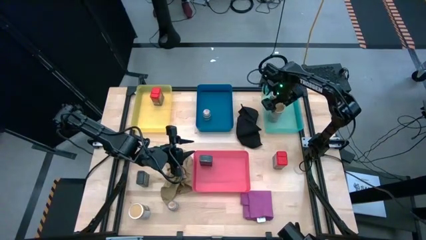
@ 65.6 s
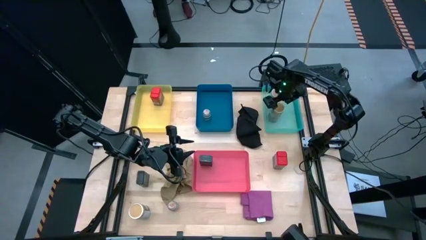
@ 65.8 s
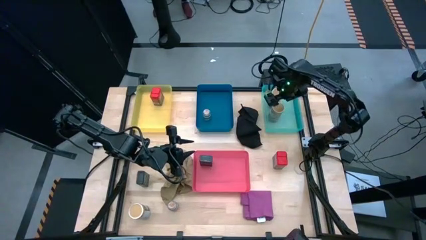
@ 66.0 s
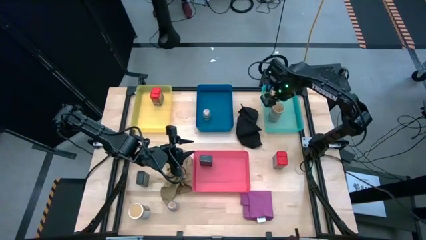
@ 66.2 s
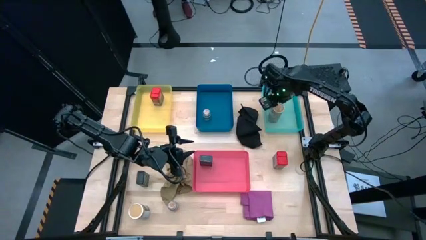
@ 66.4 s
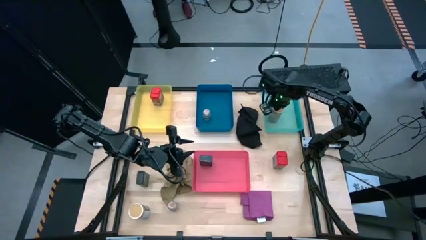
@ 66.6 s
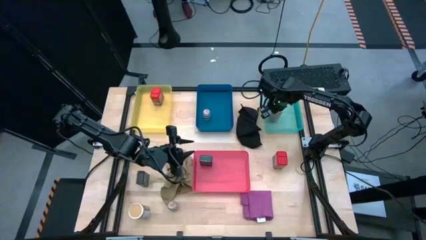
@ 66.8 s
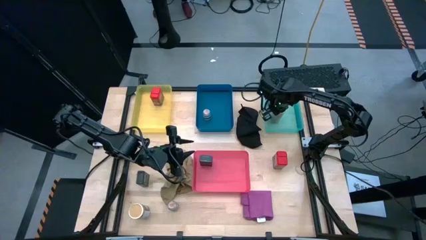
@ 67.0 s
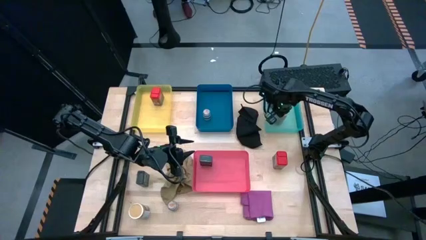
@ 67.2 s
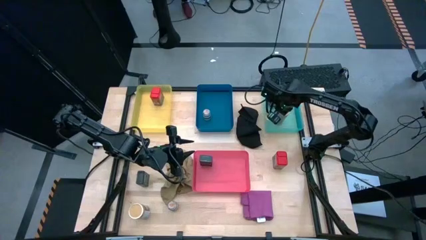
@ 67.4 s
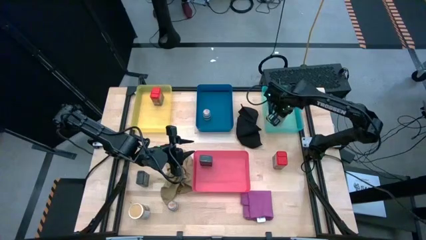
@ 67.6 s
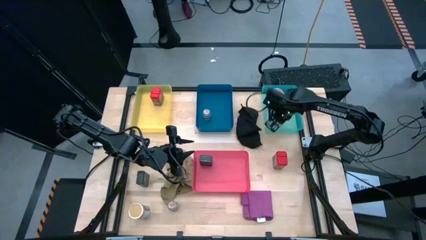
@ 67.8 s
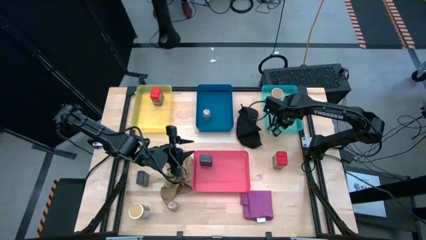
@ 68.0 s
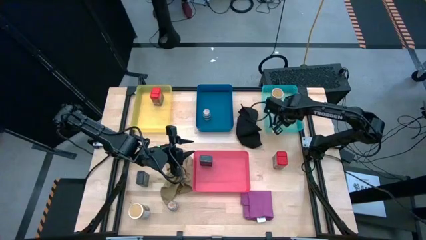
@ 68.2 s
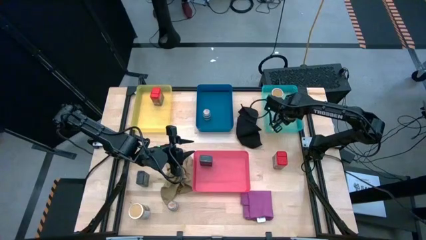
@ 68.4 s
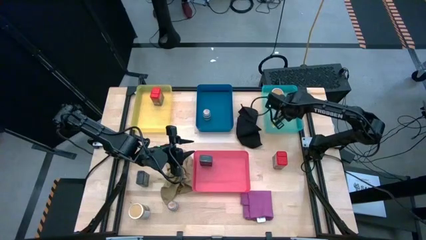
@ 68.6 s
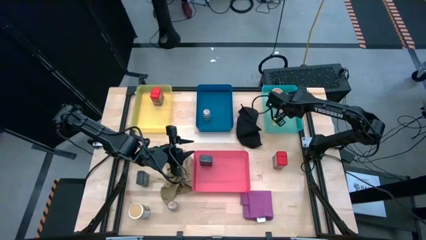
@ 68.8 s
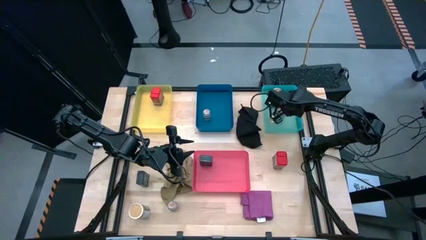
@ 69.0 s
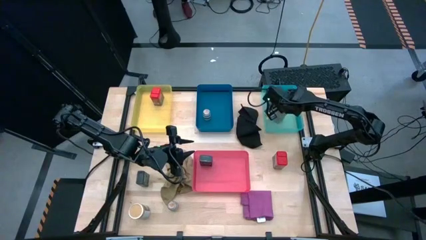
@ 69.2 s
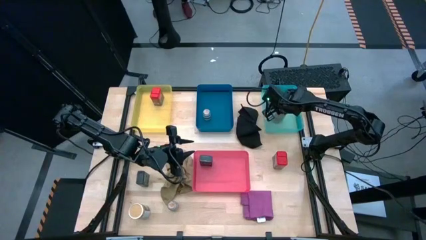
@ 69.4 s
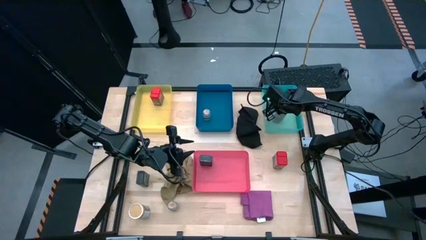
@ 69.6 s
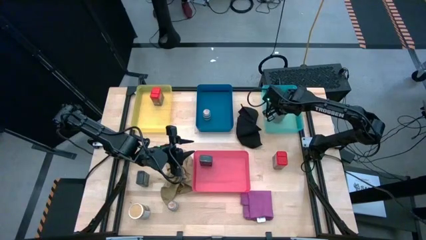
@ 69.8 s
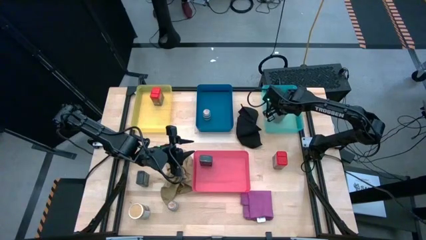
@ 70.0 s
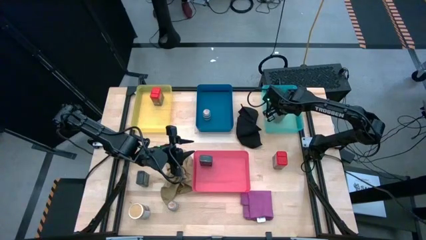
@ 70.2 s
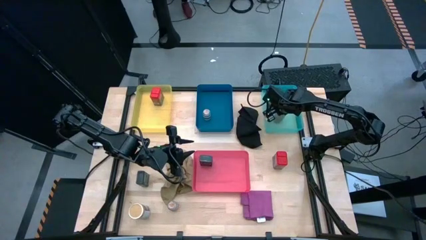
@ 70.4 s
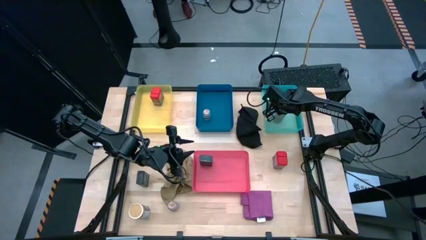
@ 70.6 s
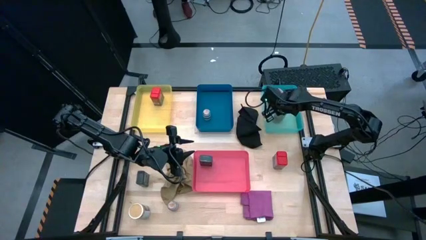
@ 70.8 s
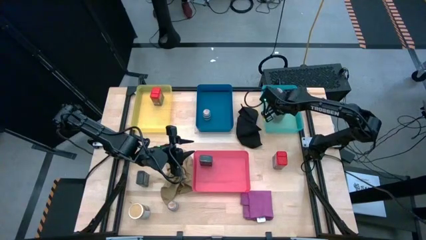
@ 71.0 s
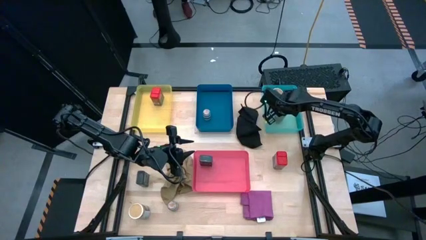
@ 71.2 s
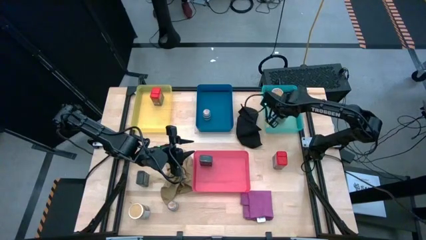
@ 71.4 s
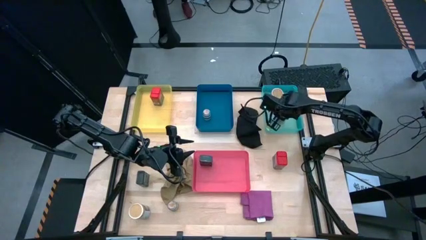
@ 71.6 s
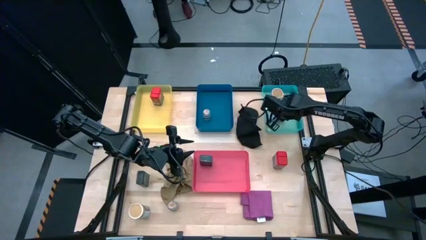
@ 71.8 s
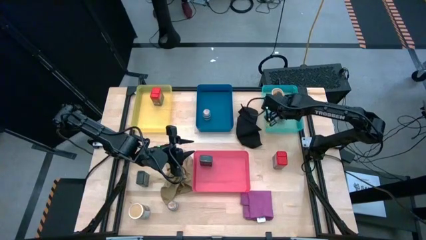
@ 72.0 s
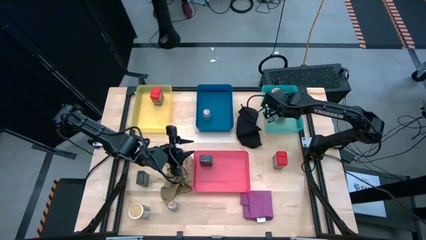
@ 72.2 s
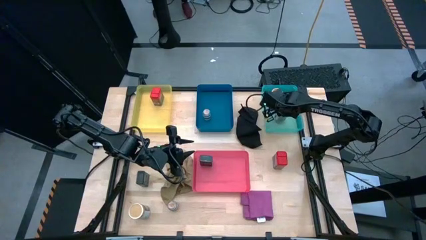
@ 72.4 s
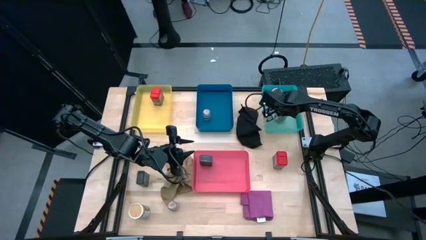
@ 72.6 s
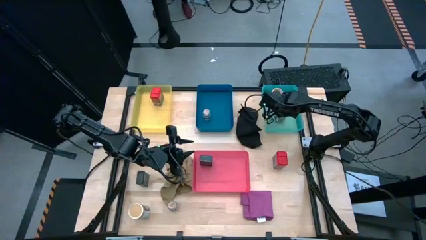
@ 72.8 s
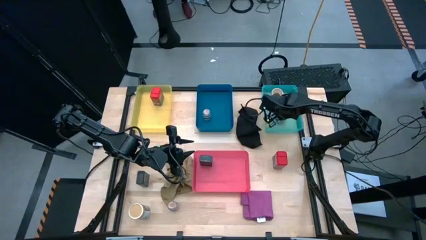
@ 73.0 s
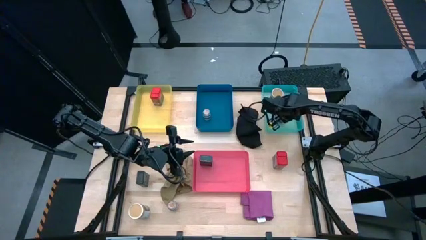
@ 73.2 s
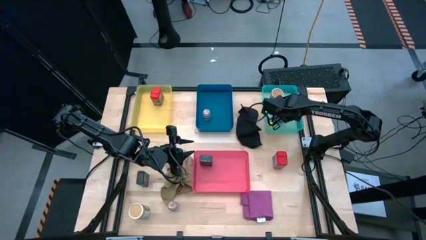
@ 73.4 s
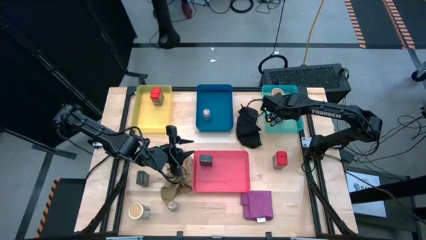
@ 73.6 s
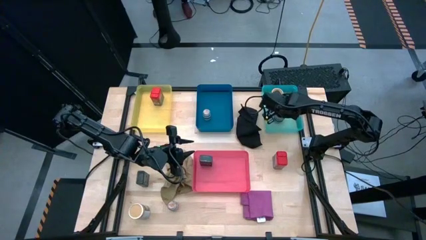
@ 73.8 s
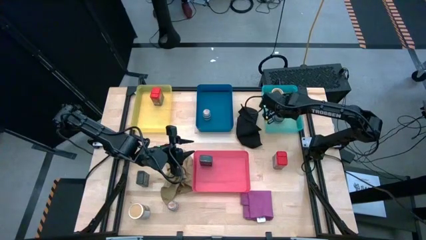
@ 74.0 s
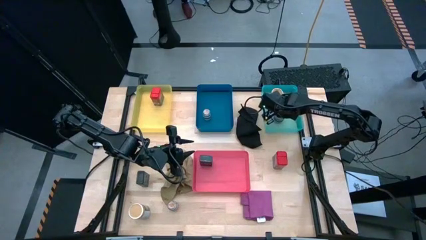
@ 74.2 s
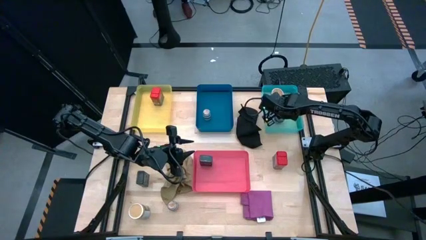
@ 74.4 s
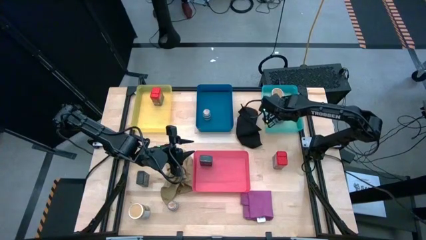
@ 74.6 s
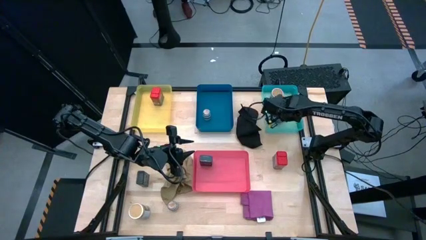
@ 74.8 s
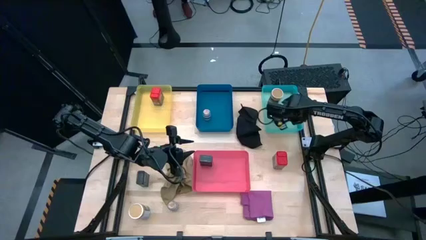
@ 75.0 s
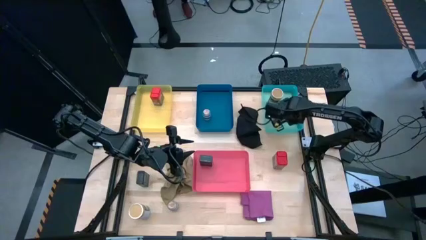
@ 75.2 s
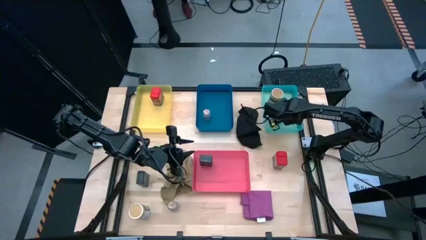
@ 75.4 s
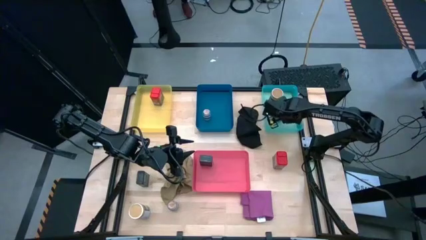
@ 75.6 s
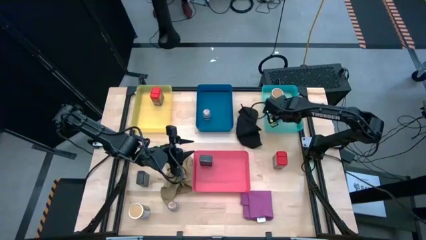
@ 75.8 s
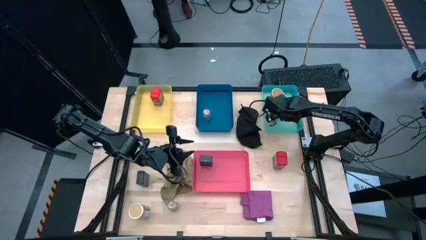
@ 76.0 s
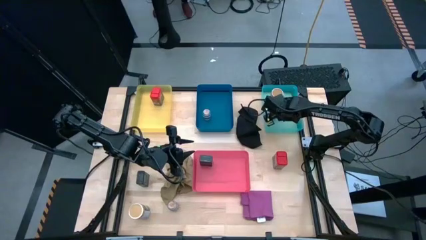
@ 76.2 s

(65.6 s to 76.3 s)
Task: Sort spices by type
Put the right golden seasoning bottle into the light blue bin

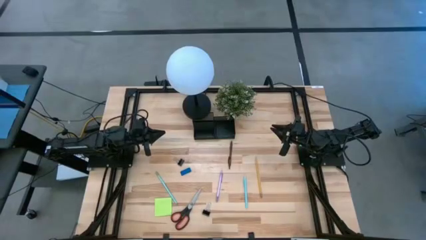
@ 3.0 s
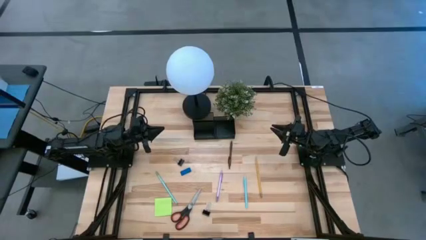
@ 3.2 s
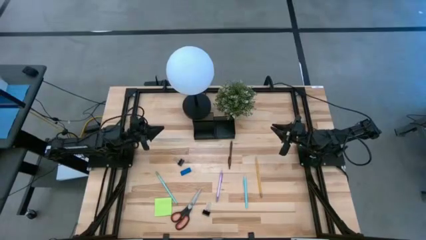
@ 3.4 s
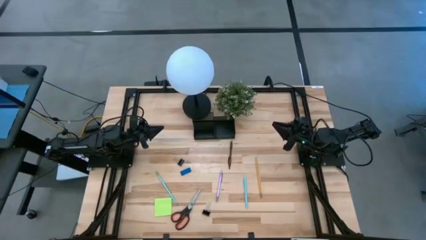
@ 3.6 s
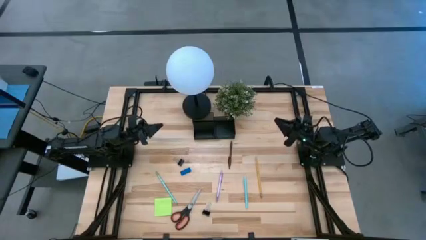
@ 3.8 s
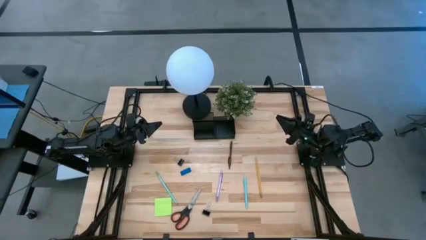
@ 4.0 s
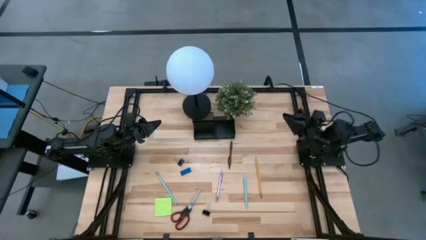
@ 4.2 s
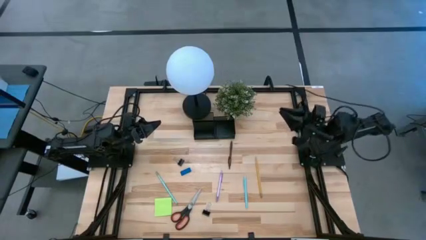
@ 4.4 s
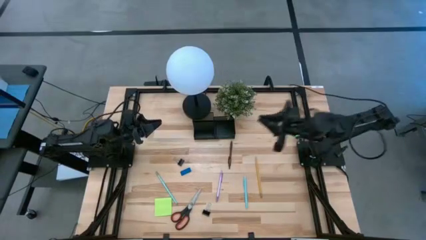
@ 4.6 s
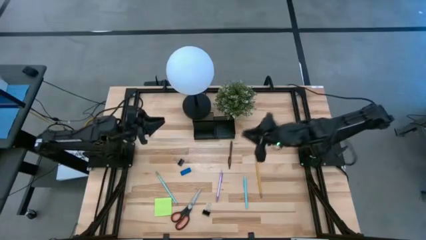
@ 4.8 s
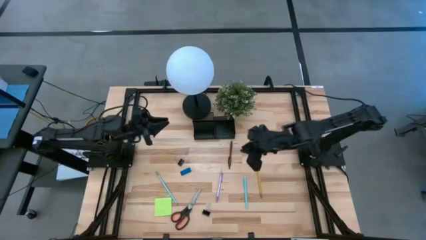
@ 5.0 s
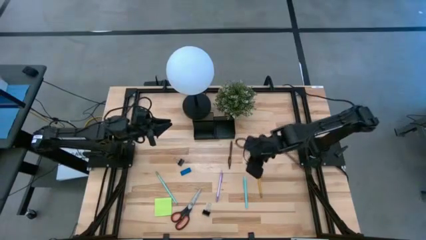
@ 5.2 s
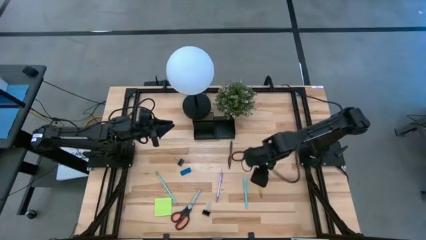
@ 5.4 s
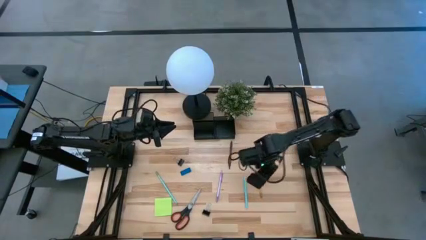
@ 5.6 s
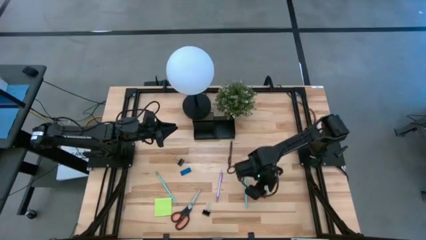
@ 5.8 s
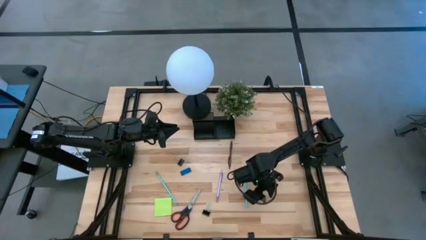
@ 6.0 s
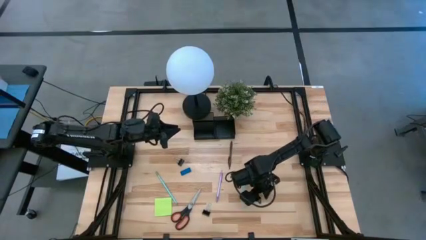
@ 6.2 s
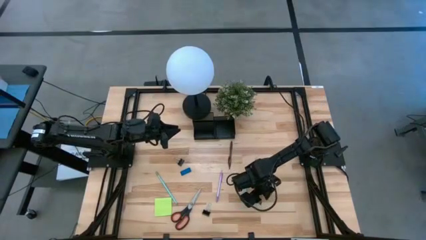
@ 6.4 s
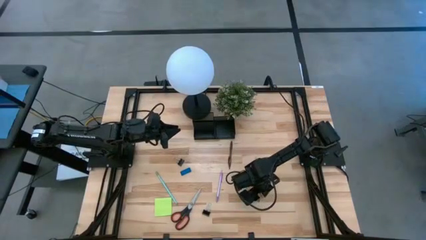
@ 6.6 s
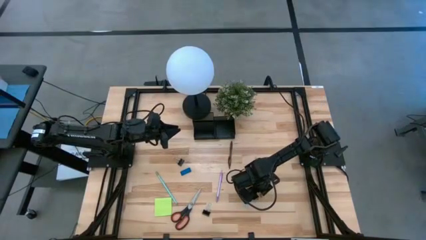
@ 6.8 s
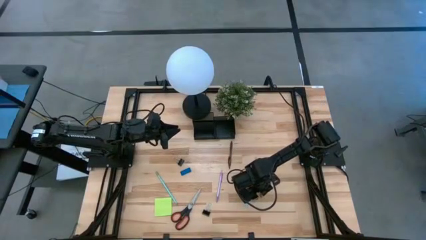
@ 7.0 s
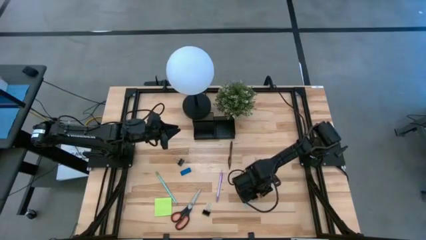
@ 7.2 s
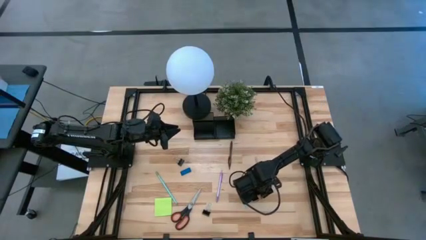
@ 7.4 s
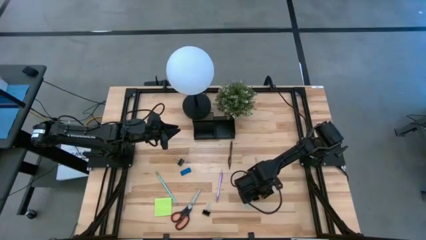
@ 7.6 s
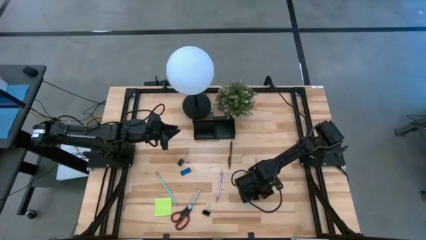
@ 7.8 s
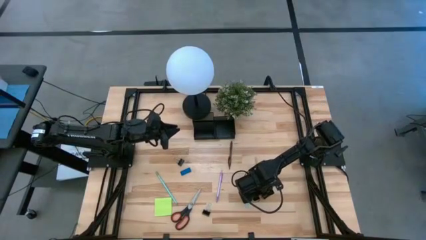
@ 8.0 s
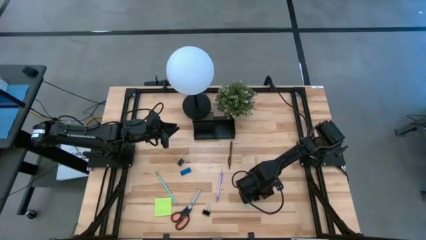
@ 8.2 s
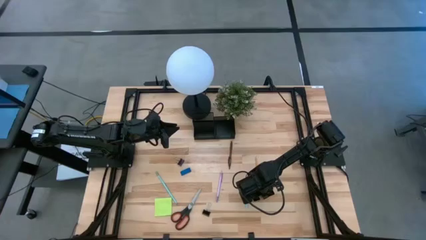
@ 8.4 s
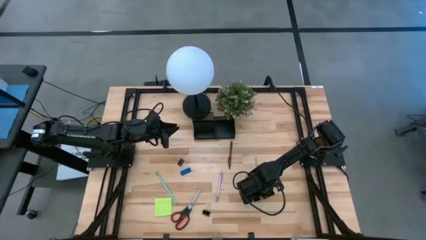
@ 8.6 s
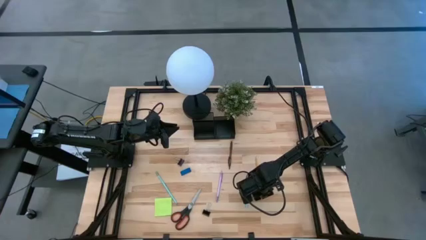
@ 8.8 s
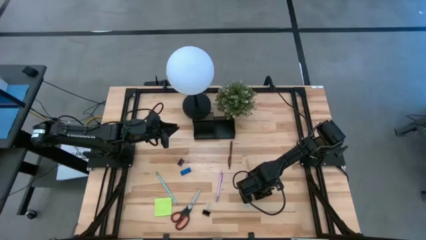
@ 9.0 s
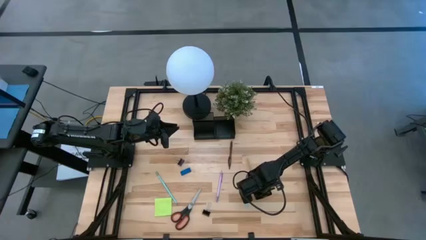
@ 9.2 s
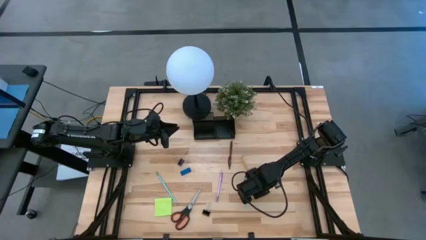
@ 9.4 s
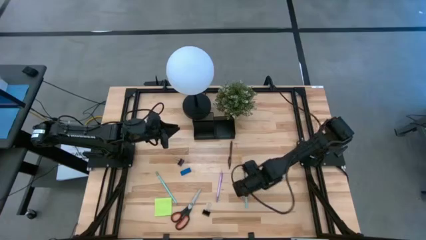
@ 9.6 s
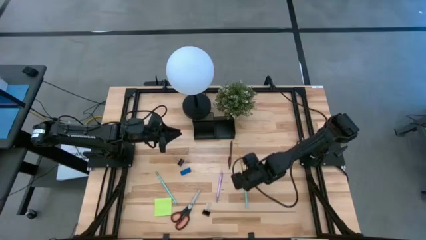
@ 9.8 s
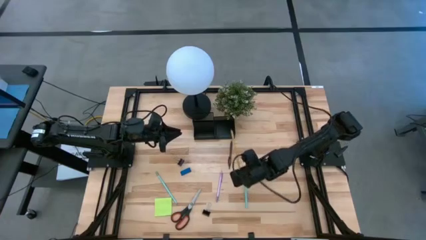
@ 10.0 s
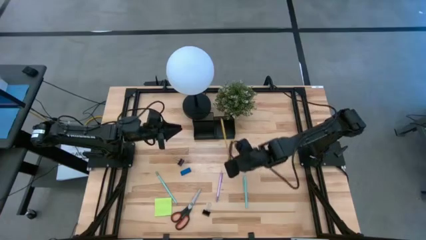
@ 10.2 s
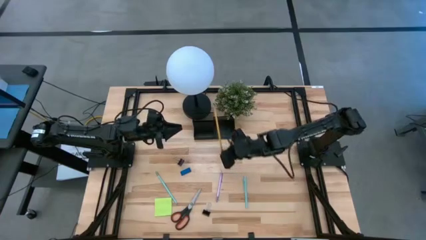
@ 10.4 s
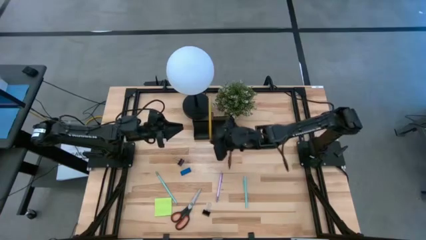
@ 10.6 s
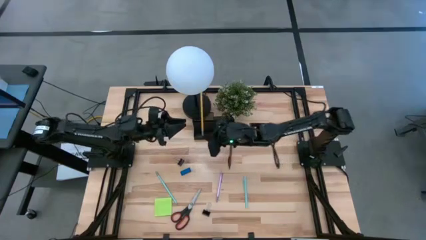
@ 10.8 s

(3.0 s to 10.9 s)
Task: Pick and place office supplies into organizer
Put the yellow pencil into the black desk organizer
